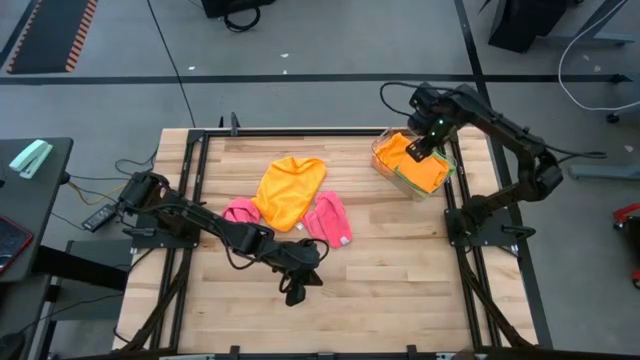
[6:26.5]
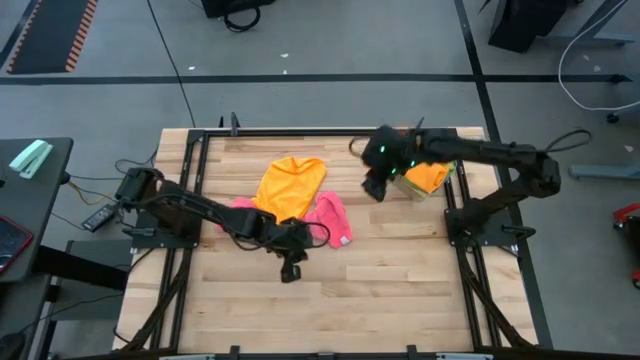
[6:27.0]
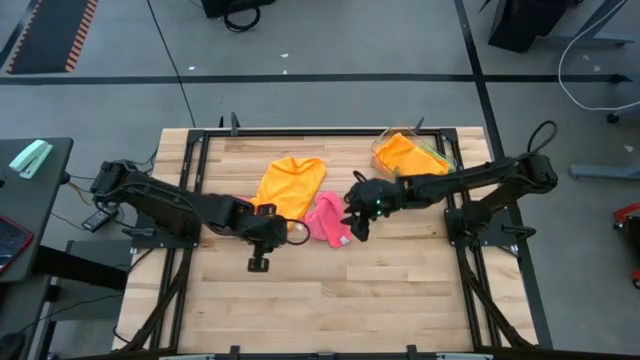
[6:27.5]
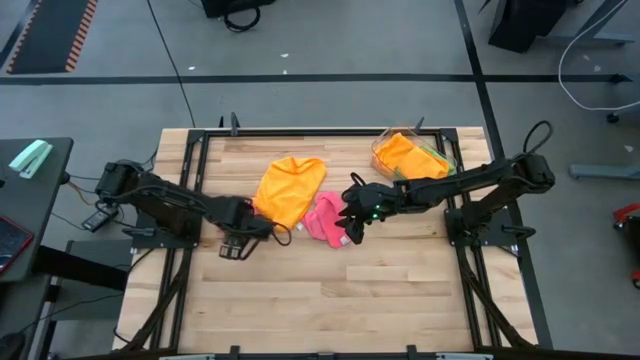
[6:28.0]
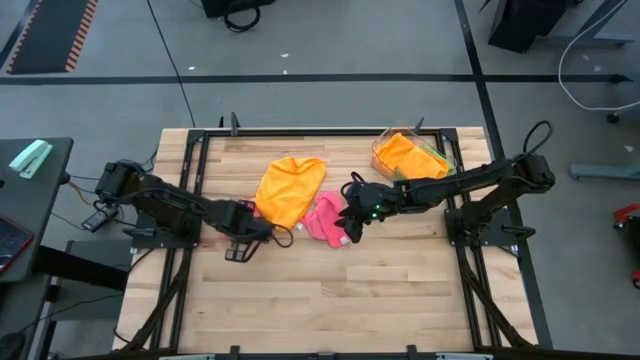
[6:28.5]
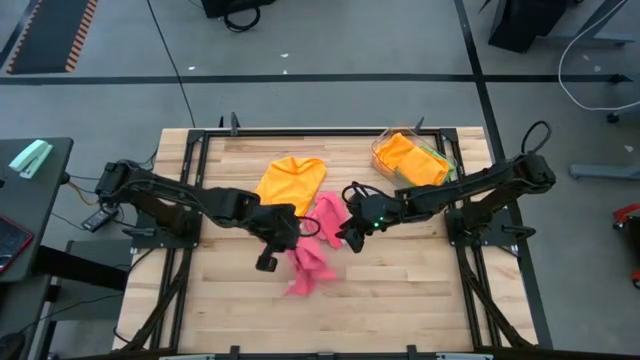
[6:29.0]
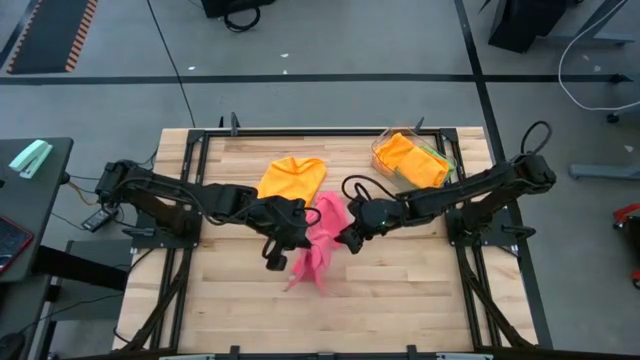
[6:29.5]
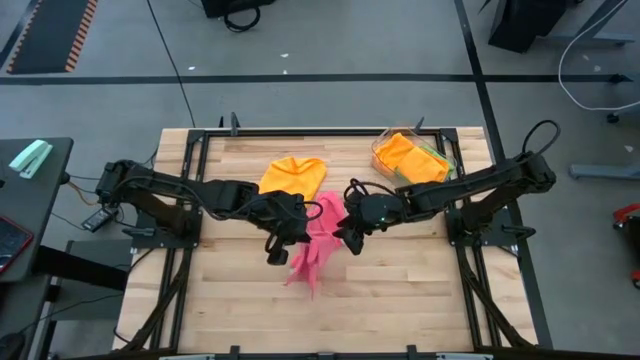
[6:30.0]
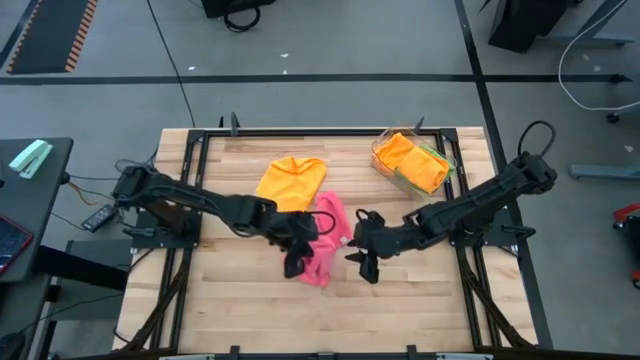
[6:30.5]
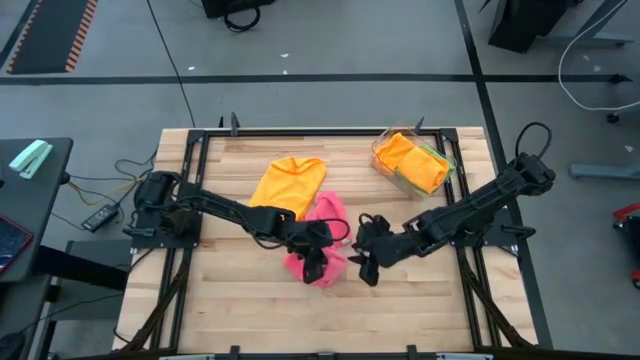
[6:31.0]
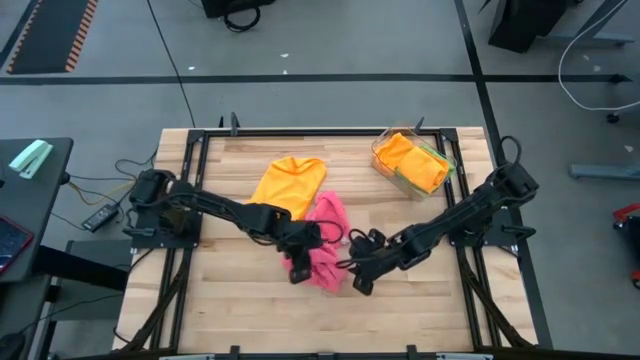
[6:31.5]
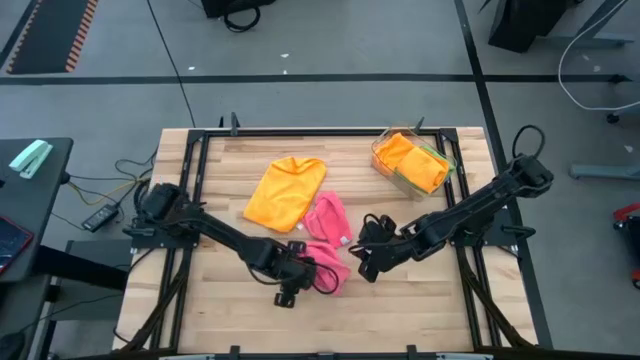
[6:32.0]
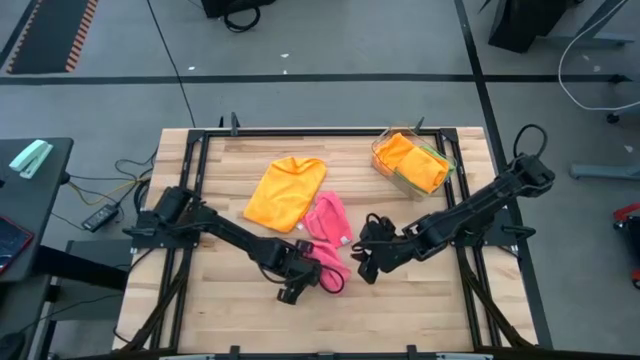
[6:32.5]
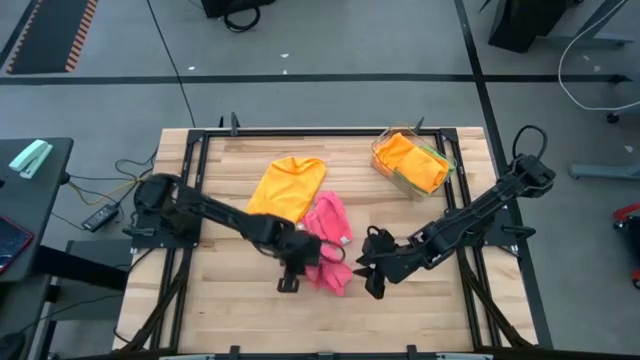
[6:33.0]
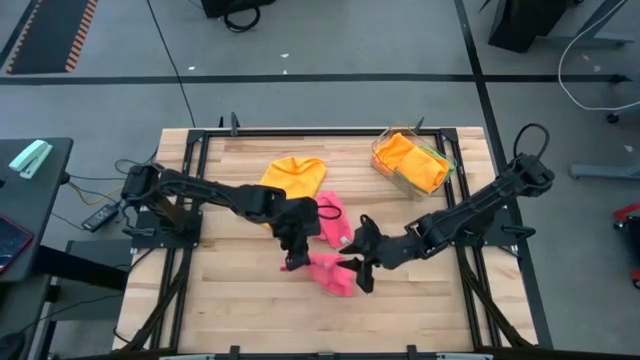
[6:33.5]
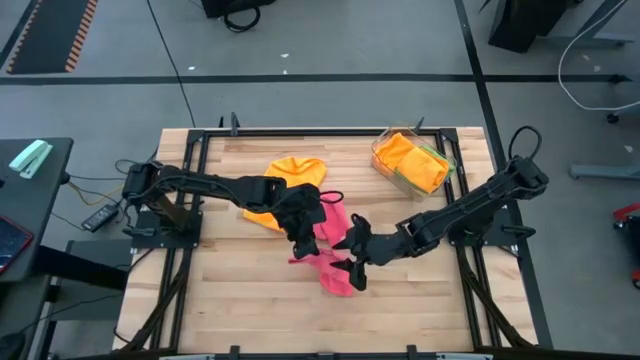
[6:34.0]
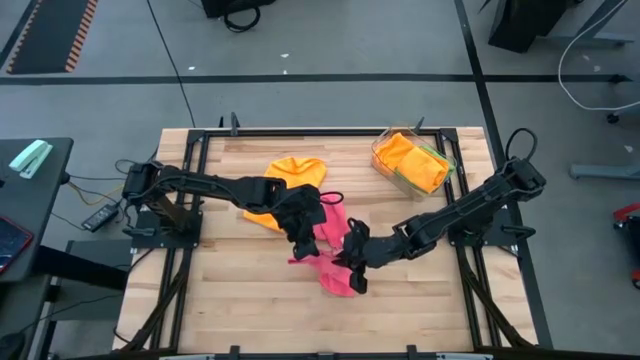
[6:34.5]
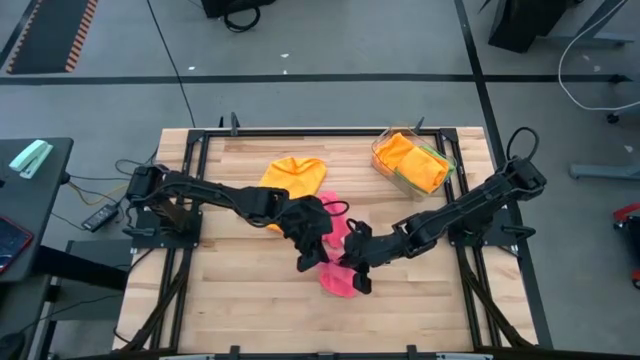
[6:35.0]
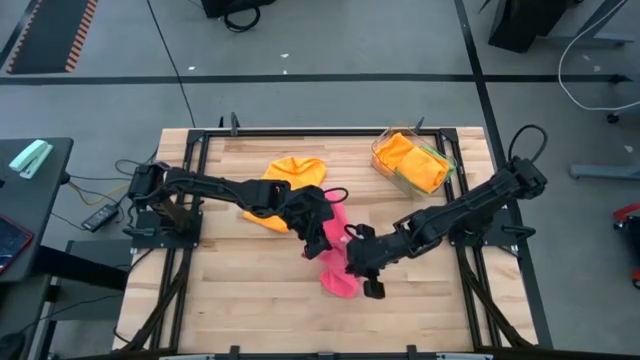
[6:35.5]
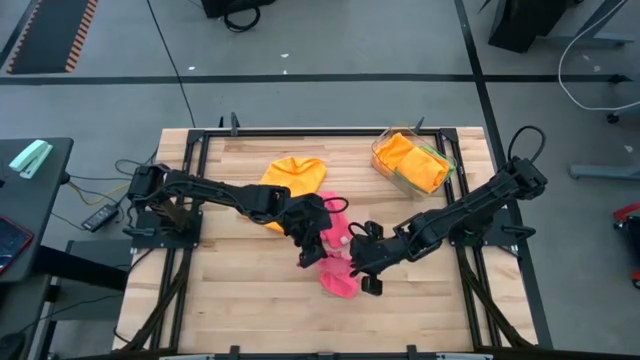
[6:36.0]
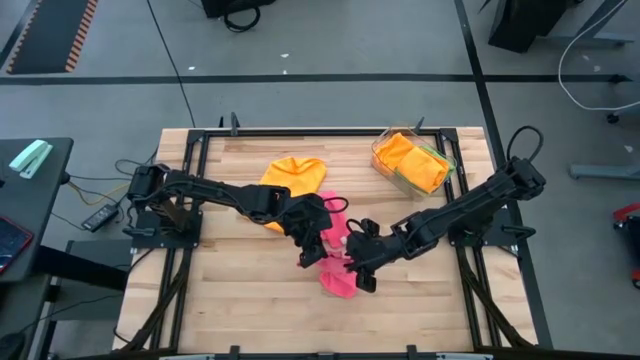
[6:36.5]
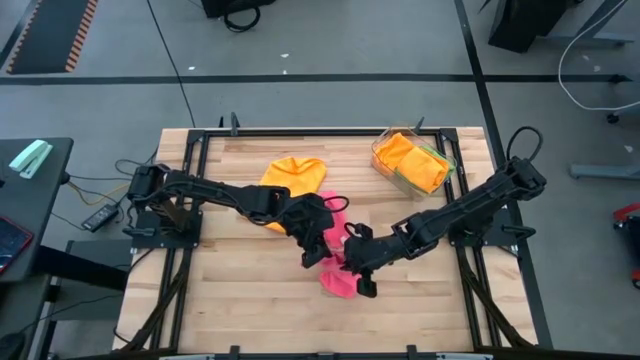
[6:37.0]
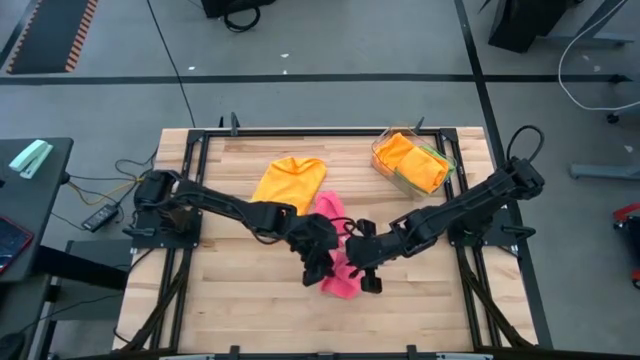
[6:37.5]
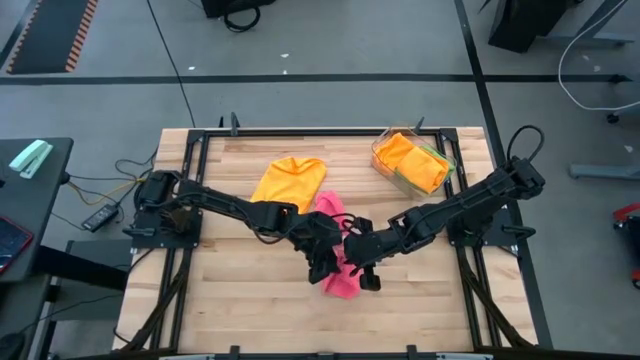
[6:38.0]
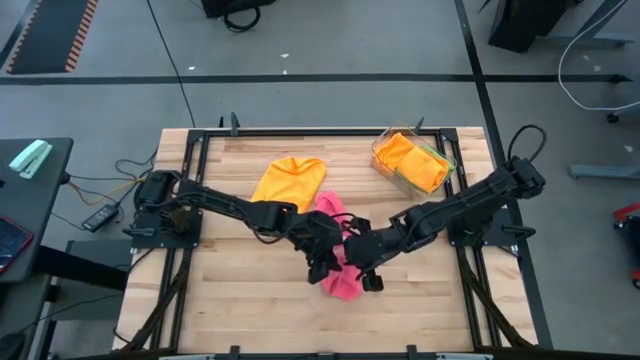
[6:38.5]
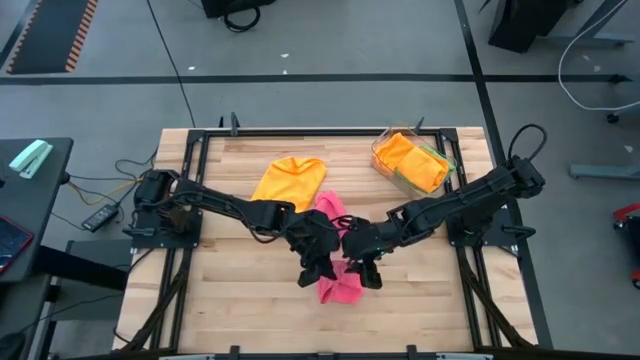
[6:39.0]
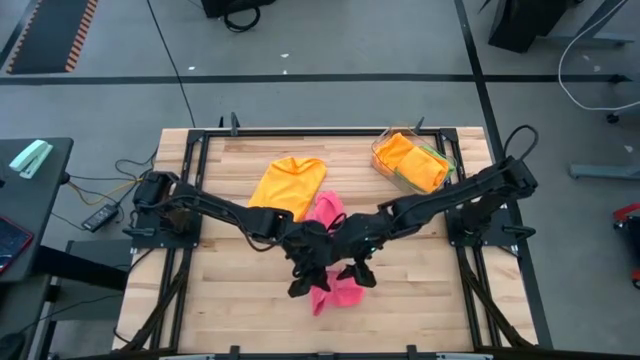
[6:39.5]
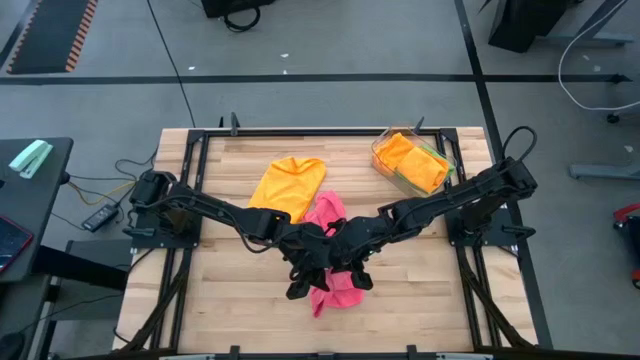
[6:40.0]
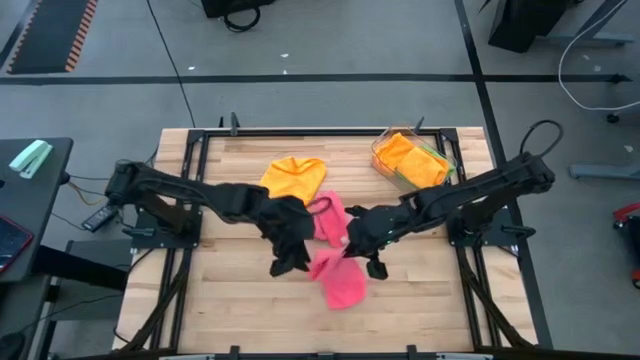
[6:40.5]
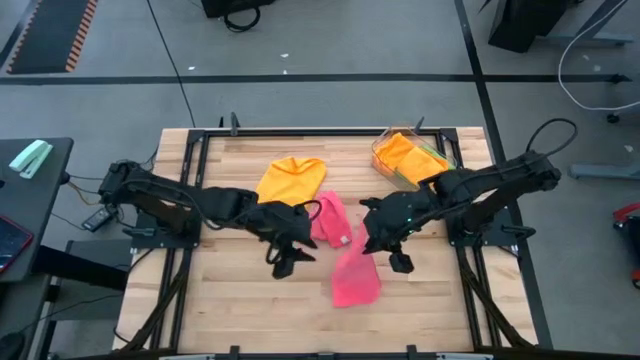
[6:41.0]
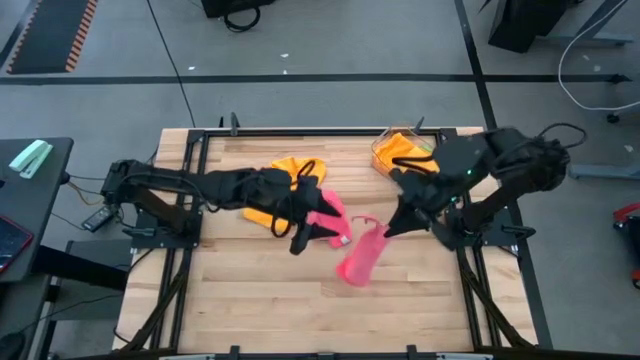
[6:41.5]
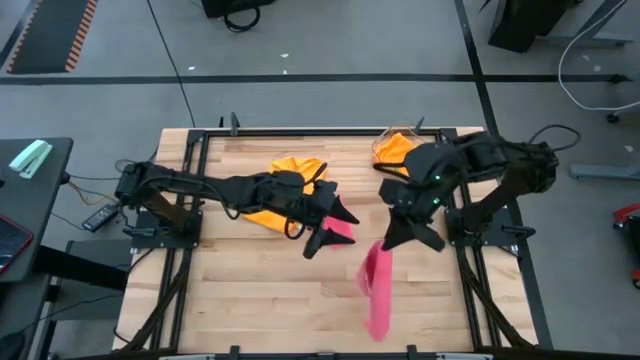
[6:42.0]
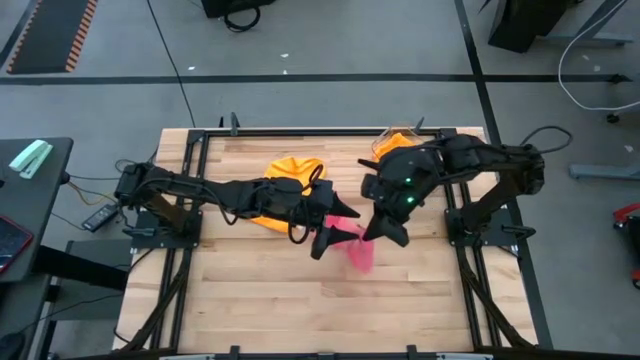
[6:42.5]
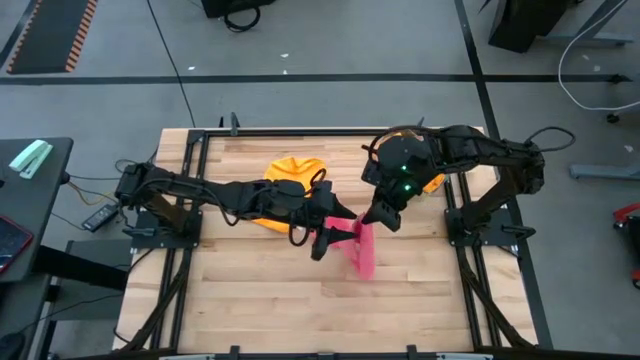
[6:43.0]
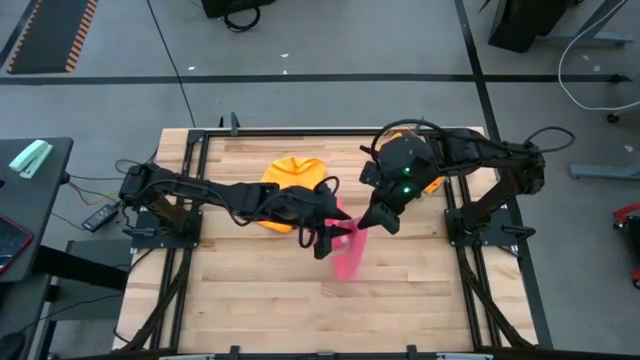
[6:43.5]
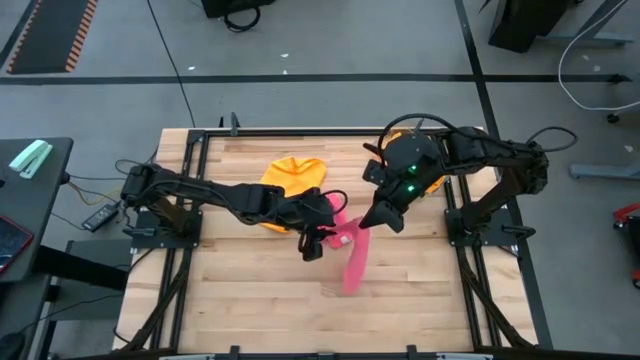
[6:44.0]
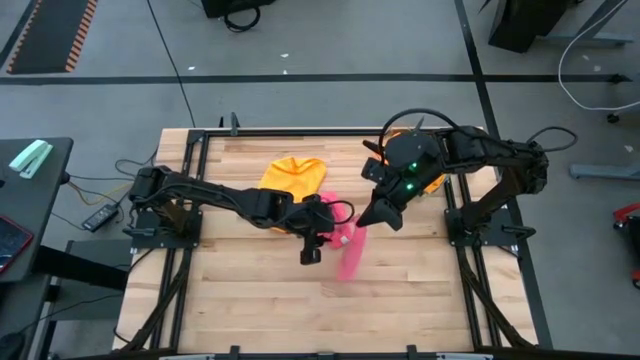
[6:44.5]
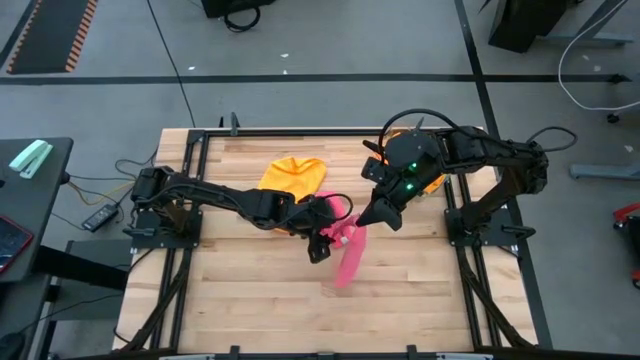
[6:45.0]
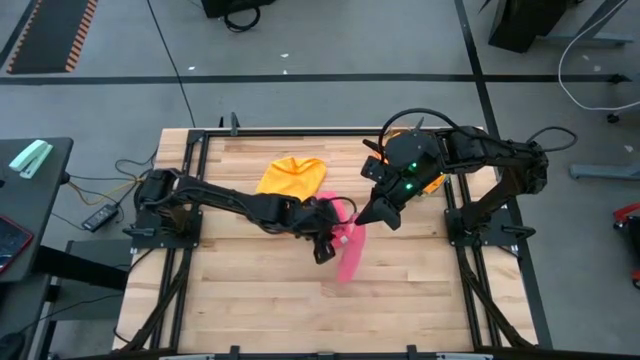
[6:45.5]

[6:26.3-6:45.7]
Task: Fold microfiber towels
Fold the left pink towel

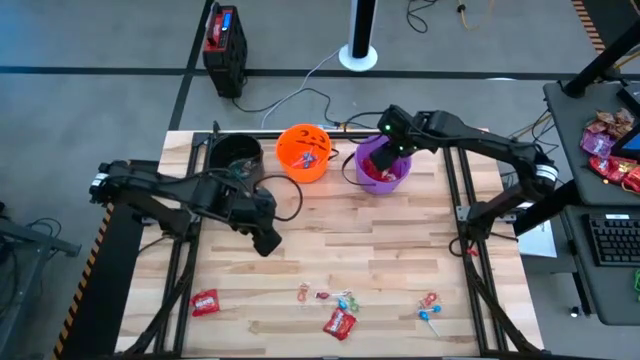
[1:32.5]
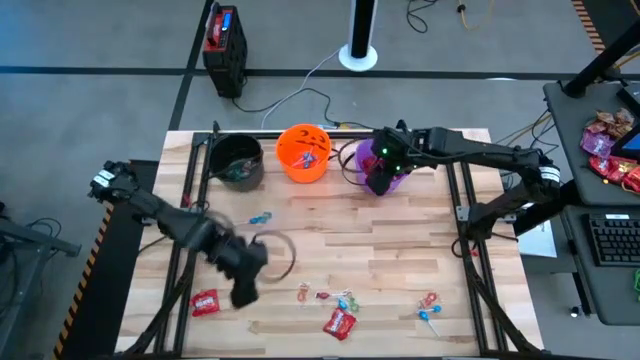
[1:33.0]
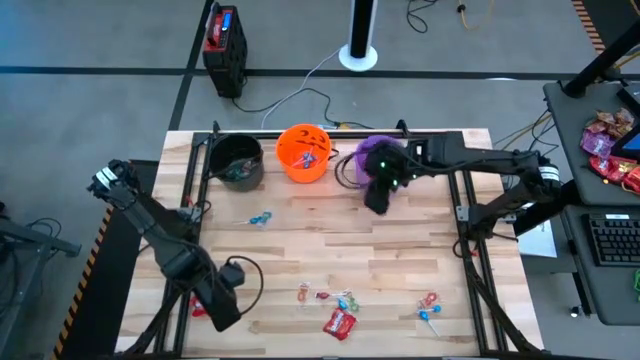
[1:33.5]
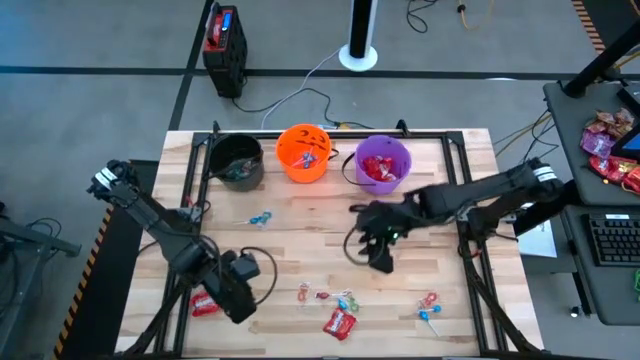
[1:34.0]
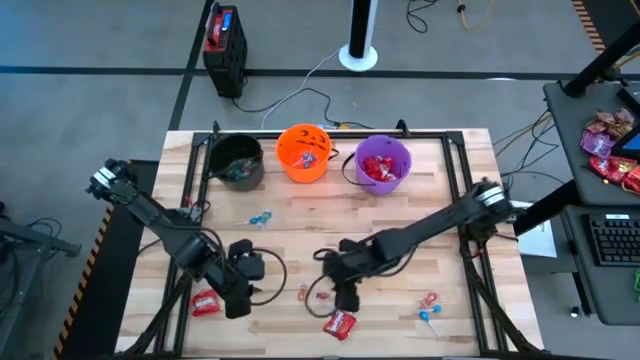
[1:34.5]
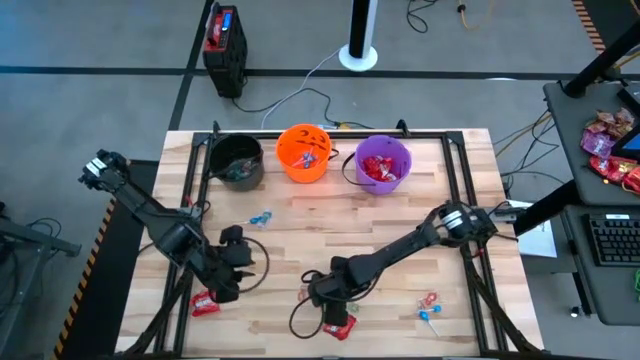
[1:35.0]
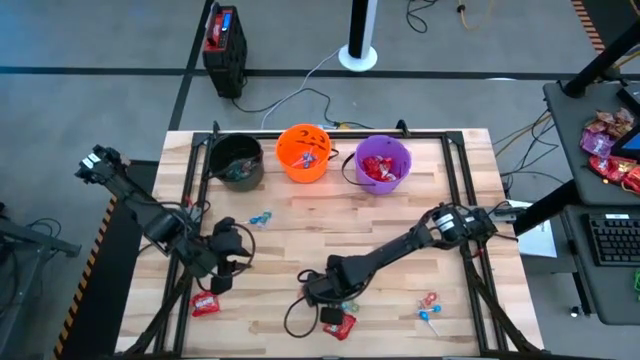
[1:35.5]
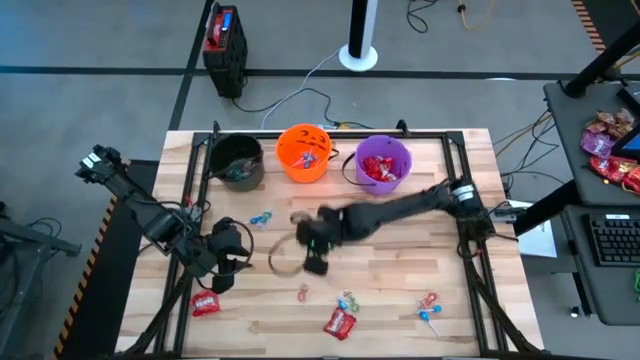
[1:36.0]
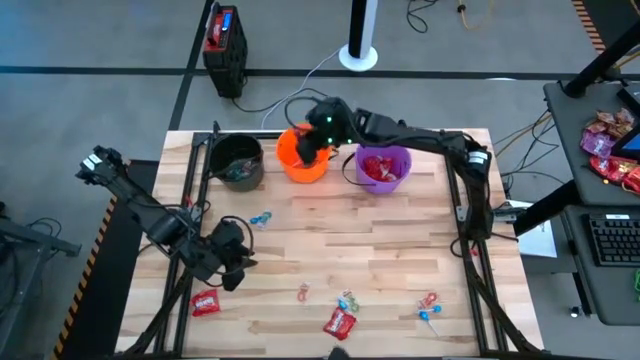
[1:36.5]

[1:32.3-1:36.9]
Task: Sort candy by brand, put in halloween buckets
Put the red candy into the orange bucket
